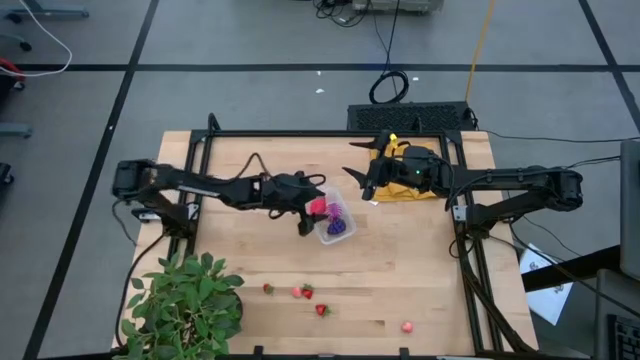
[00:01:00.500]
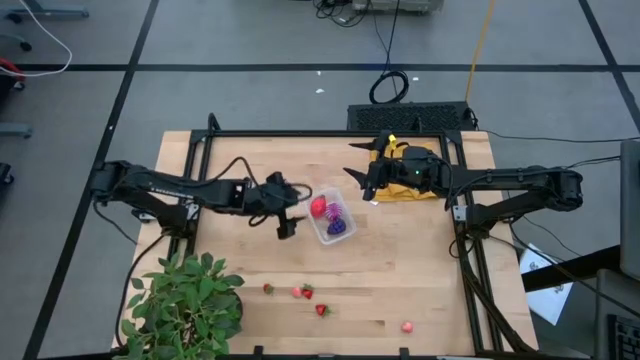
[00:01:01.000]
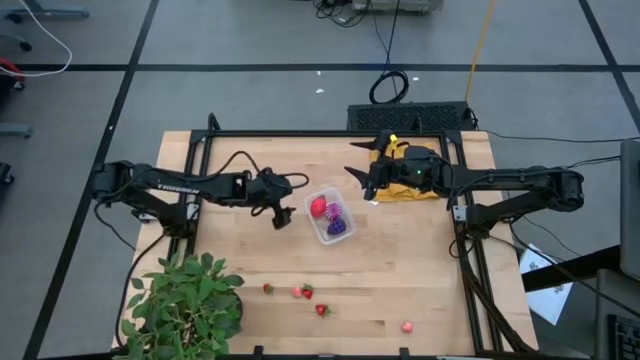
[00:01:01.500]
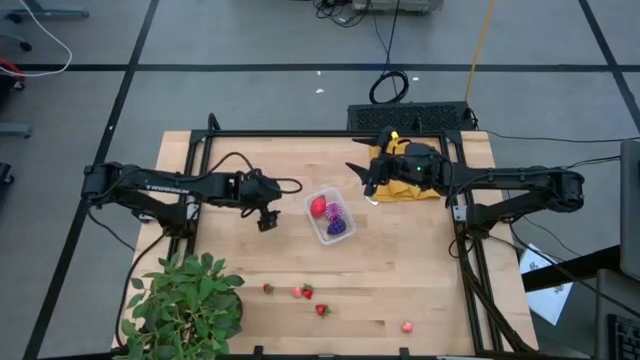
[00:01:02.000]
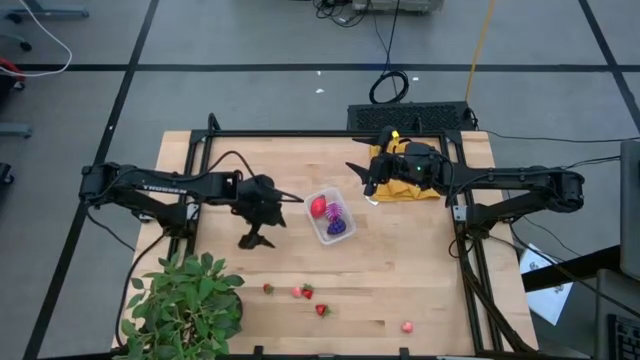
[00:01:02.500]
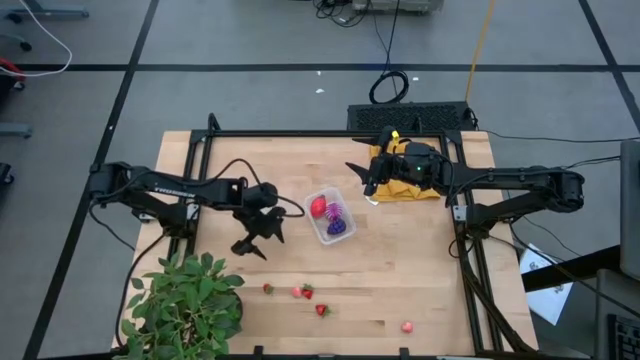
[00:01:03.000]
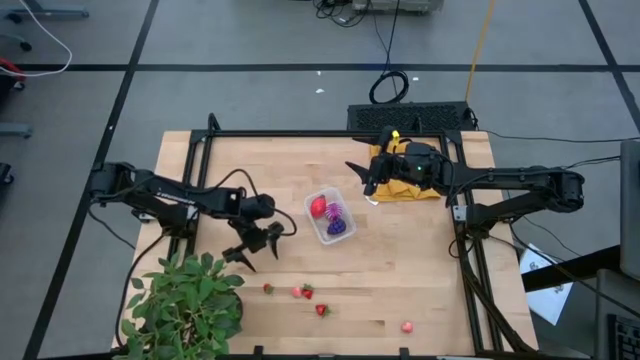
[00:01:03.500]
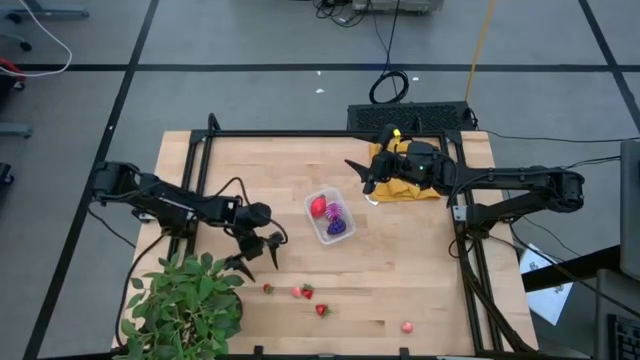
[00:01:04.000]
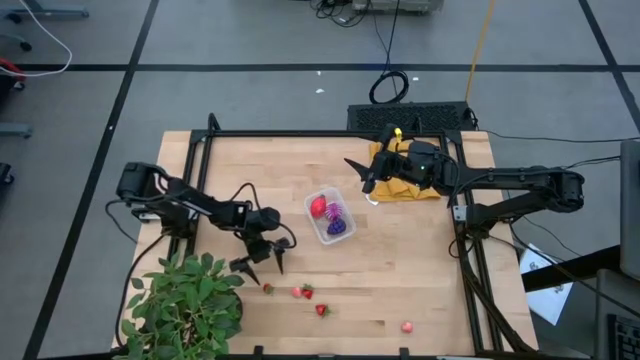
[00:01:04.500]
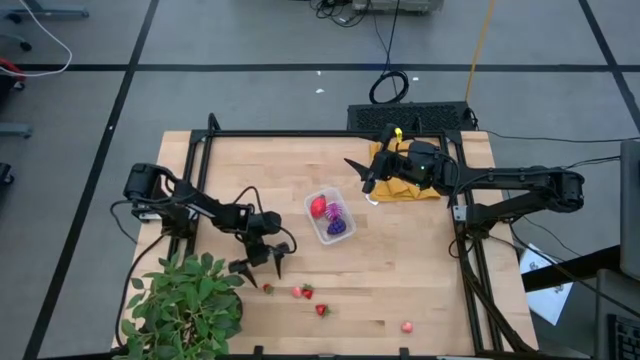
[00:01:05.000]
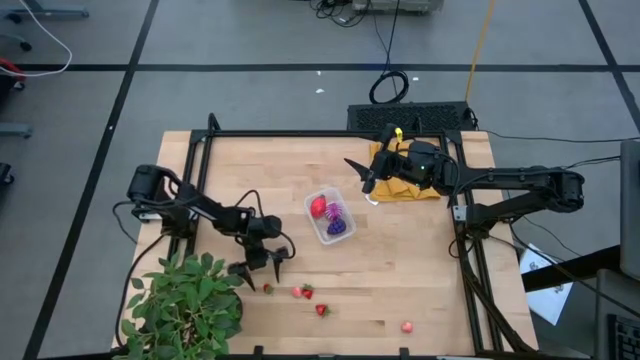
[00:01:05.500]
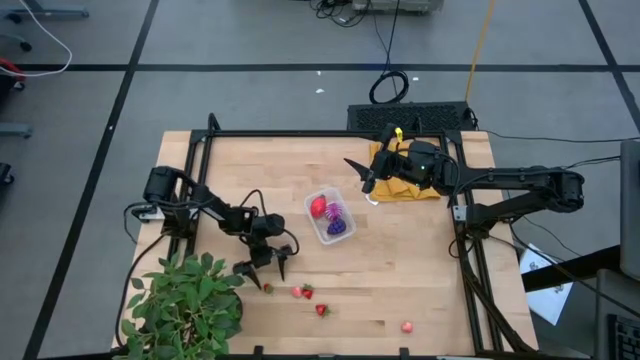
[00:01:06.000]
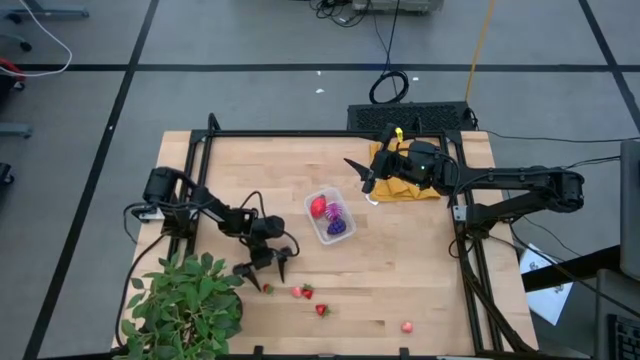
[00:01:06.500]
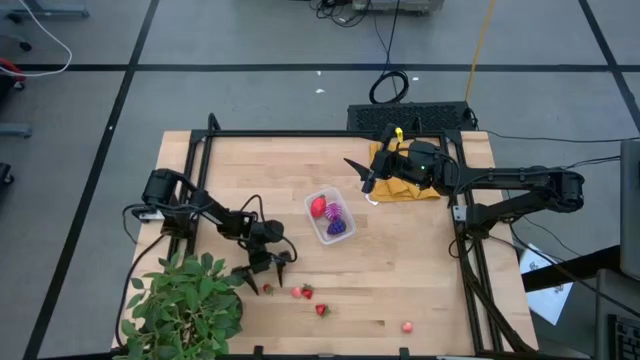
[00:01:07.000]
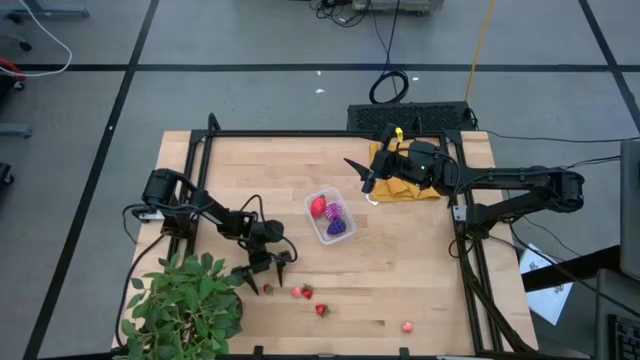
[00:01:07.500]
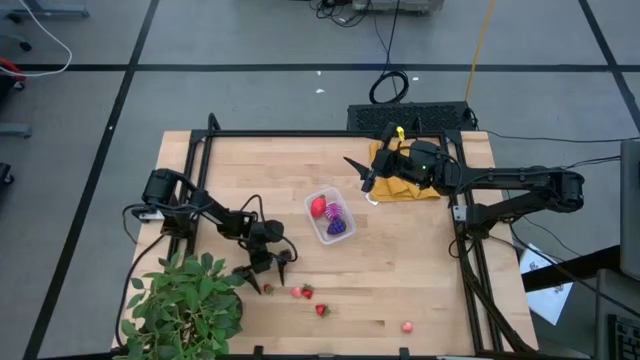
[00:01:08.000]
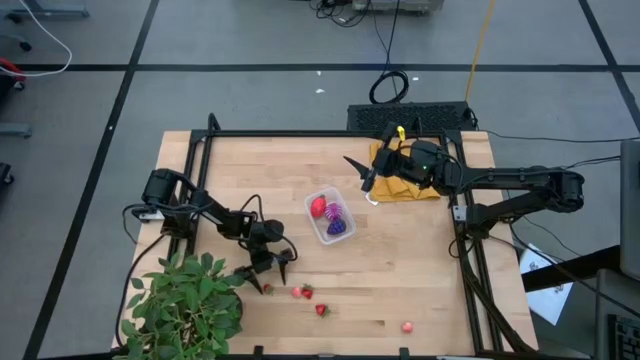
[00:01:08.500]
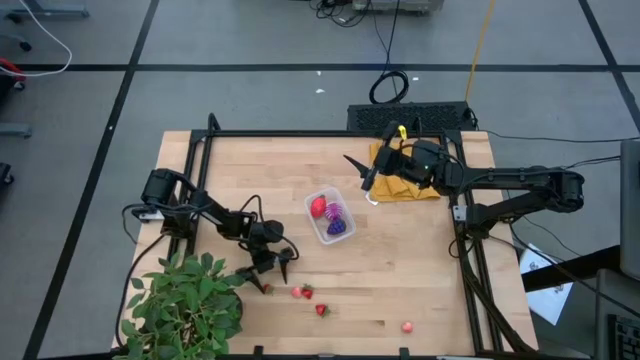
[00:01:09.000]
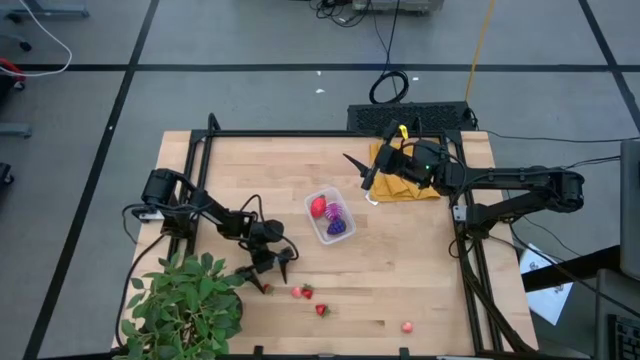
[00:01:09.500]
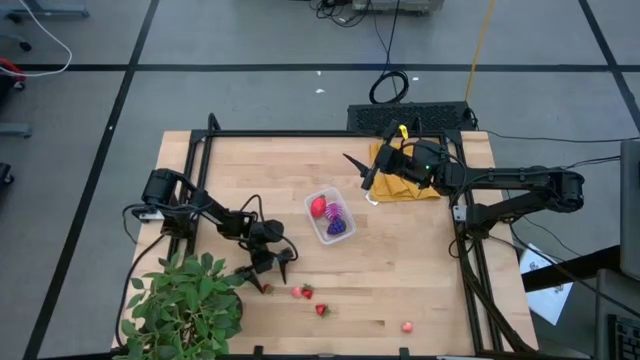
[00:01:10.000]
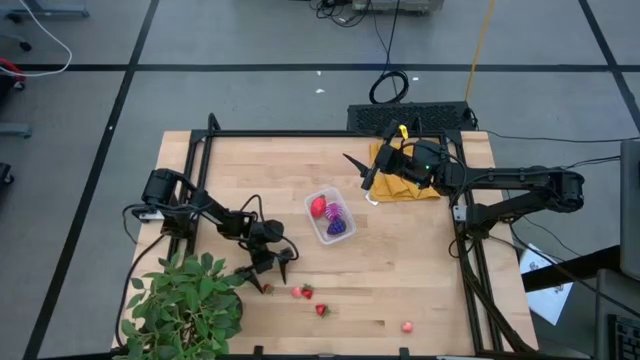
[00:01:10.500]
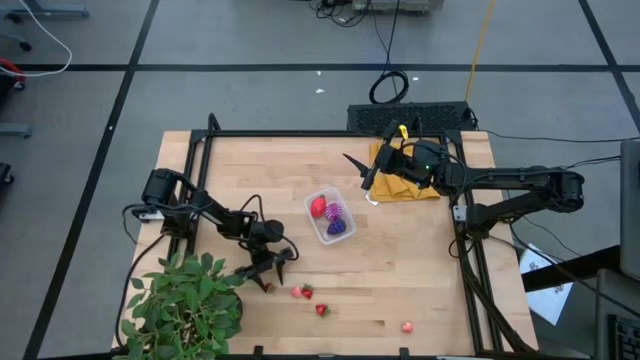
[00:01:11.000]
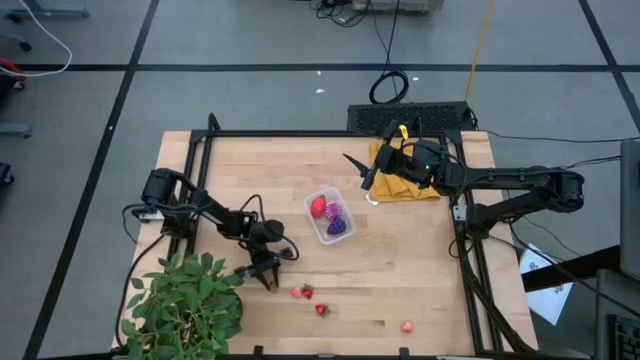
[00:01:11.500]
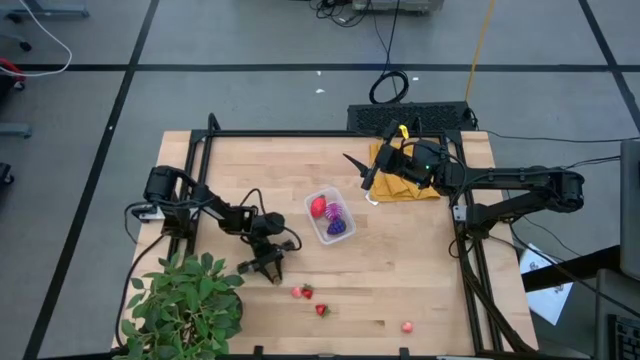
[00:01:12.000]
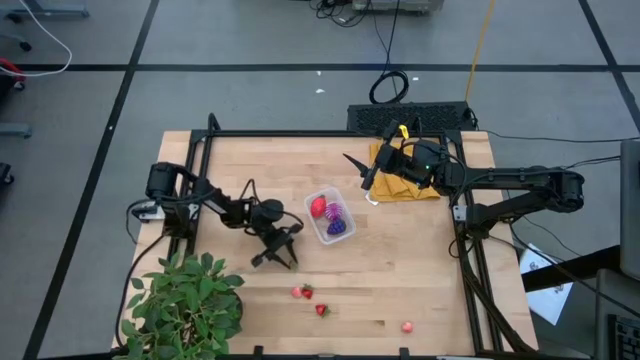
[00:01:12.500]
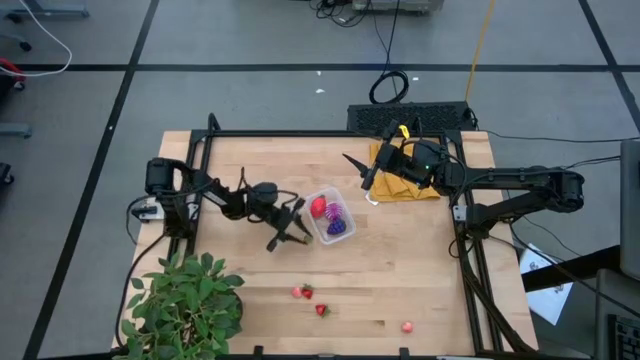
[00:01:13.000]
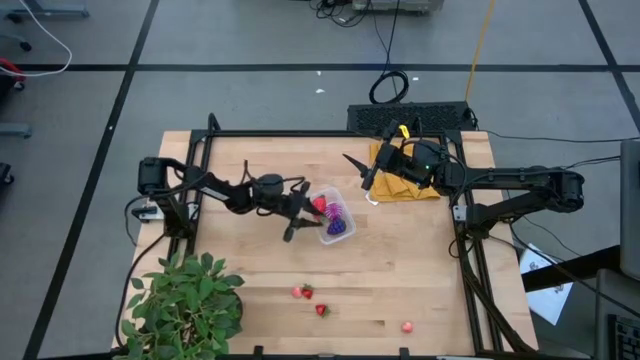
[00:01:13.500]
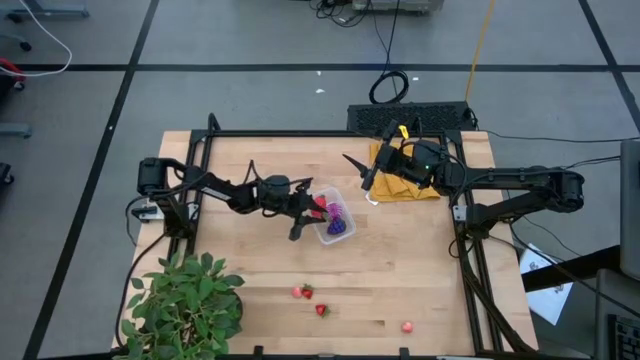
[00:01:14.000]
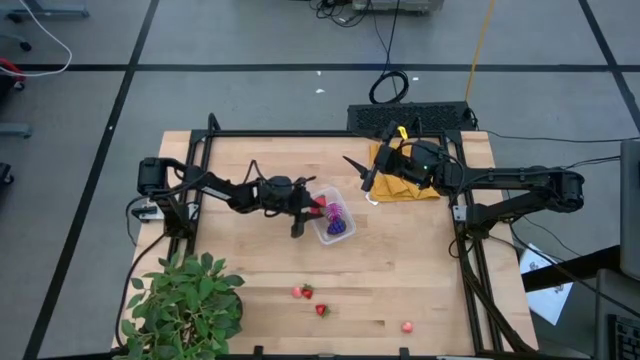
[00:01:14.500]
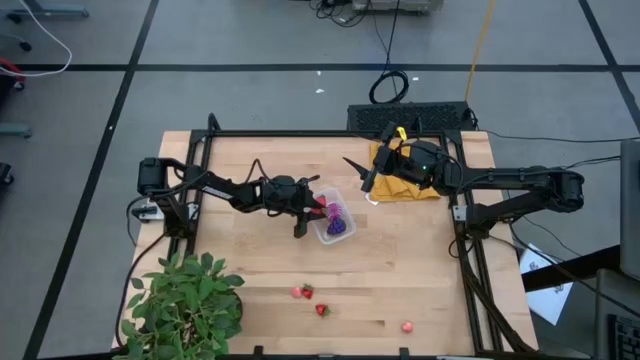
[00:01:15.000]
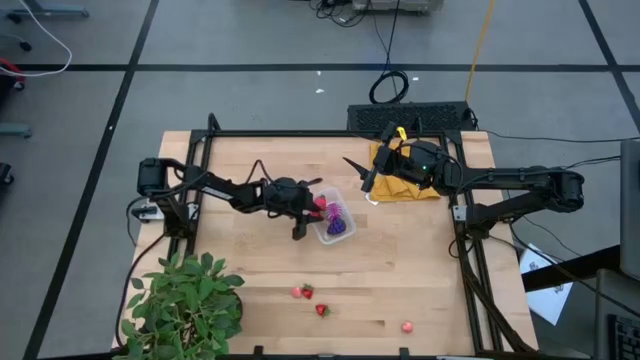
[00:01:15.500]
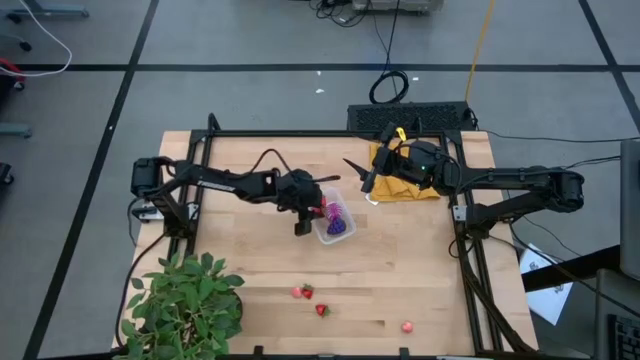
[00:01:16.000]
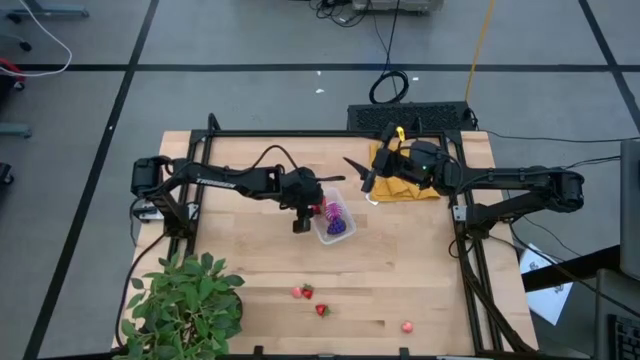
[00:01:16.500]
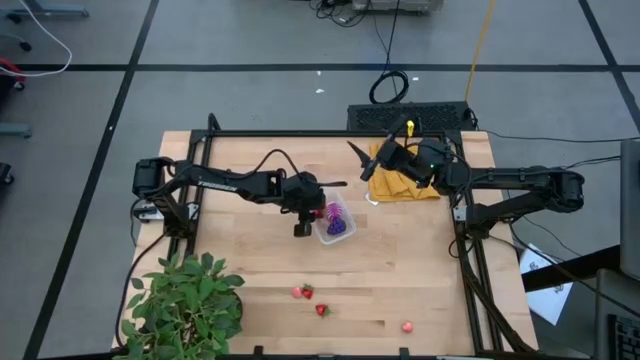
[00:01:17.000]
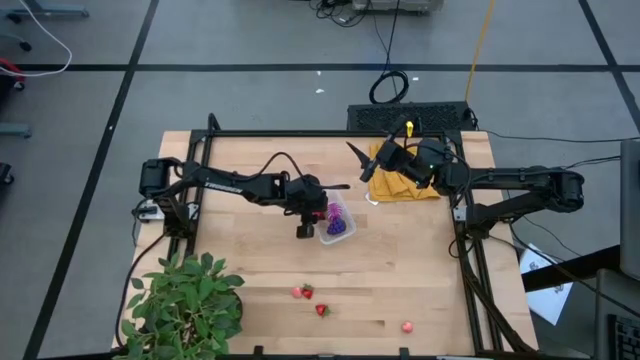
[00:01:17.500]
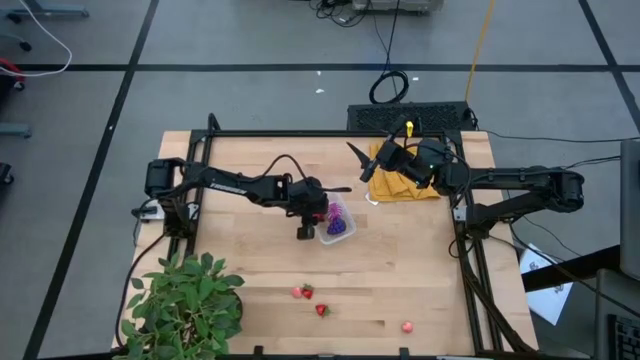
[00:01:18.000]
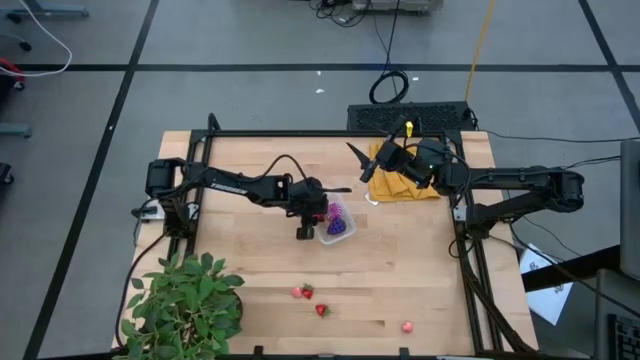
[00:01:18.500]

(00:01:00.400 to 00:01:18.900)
Task: Pick and placing Produce into tupperware
Put the top left red strawberry into the transparent container

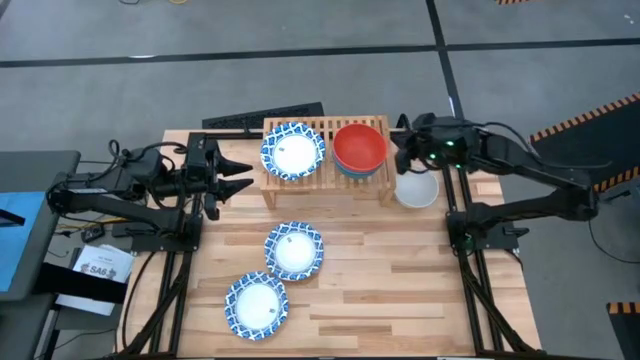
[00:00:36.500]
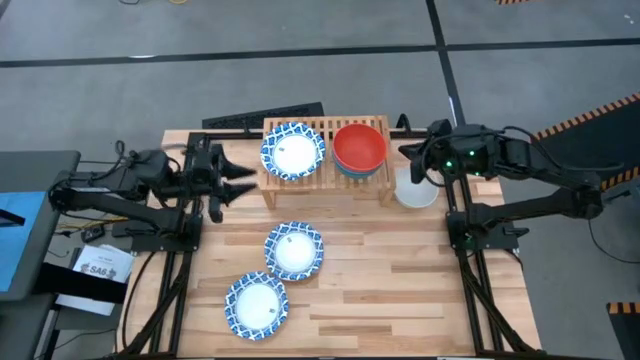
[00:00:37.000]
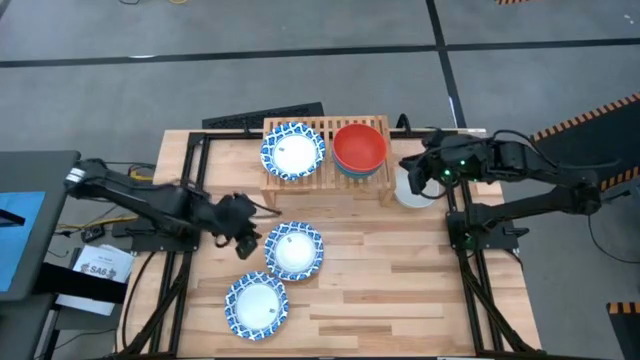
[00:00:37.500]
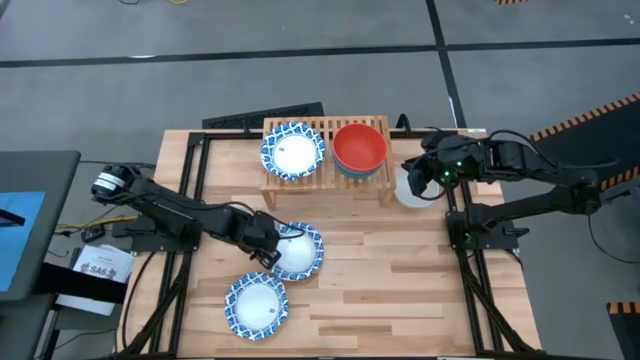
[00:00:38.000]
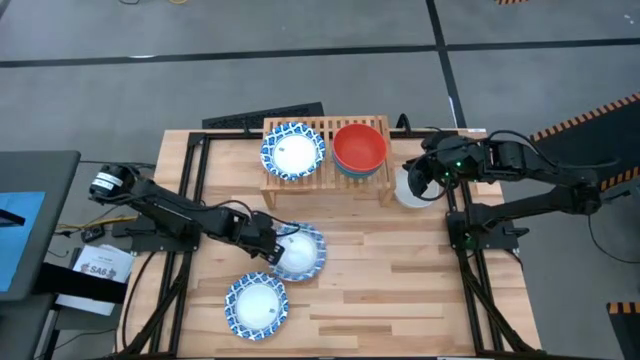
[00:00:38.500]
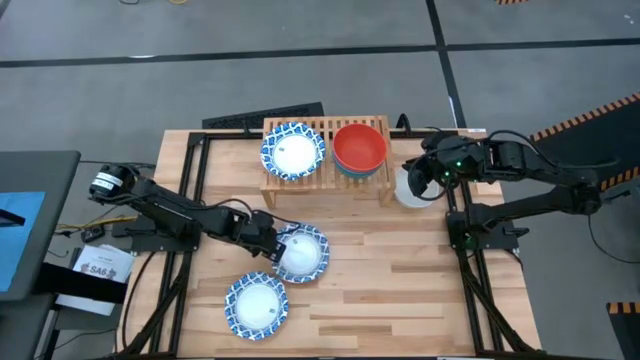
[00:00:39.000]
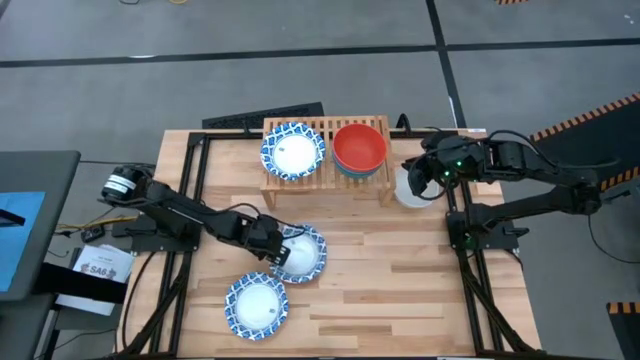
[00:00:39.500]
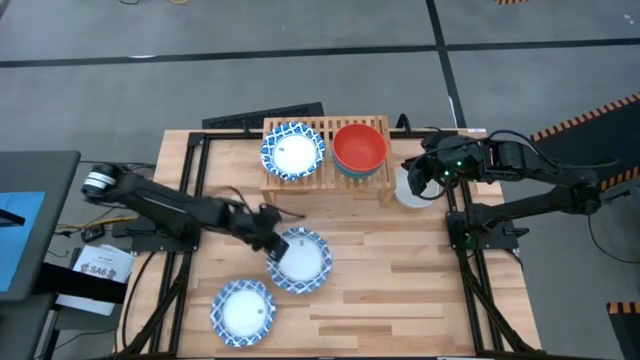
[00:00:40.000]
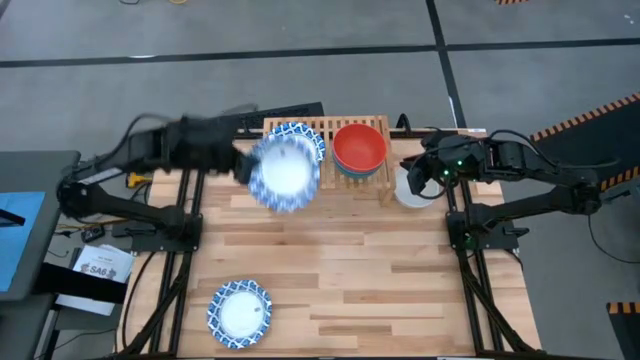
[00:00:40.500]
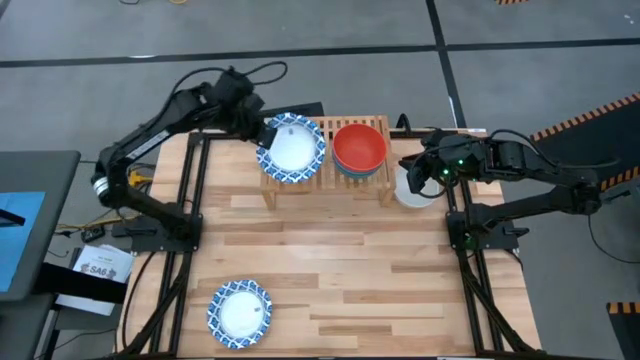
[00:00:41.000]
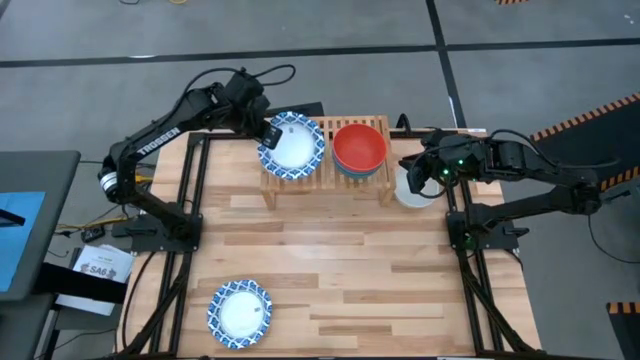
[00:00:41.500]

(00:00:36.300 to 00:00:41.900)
Task: Place and stack bowls onto a shelf
Stack the white blue bowl on top of the white blue bowl on the shelf
